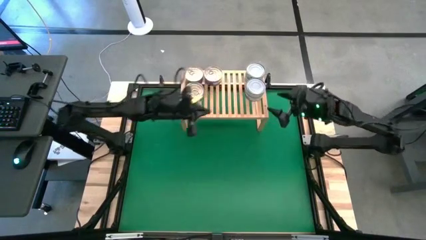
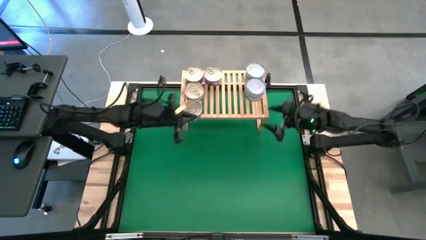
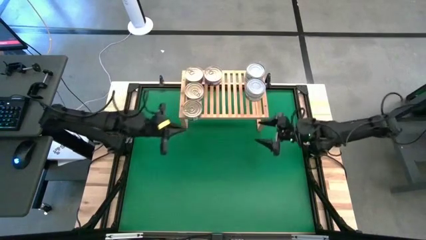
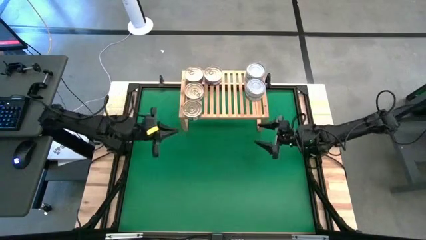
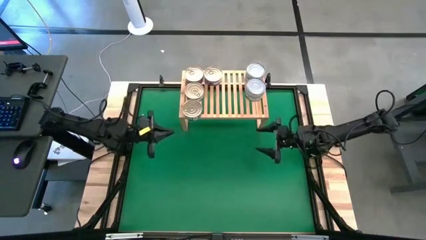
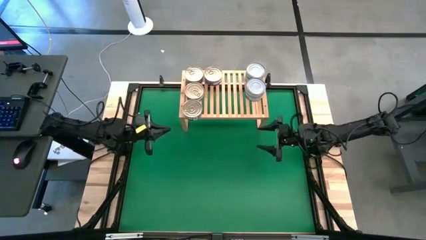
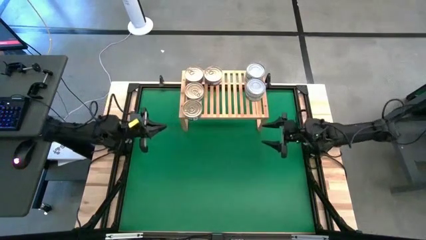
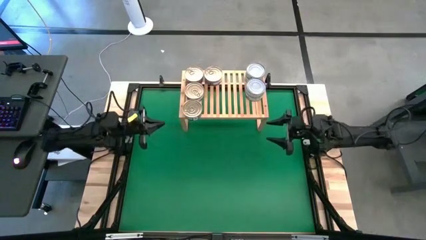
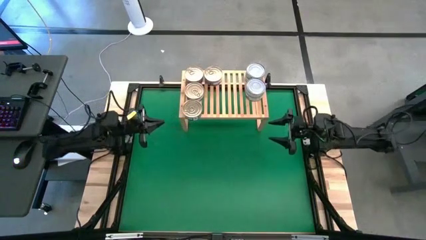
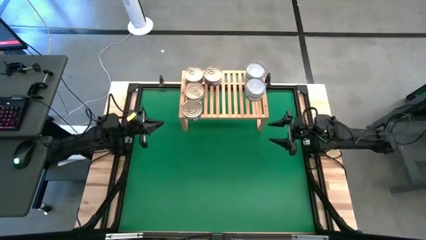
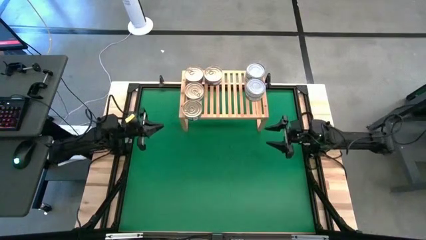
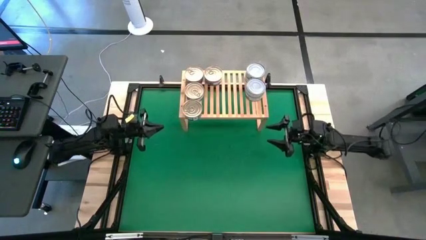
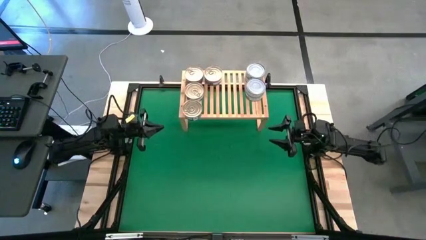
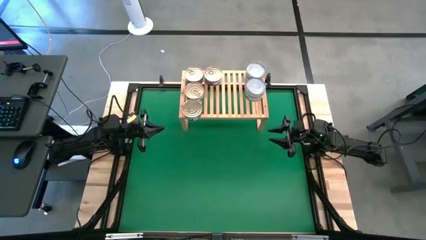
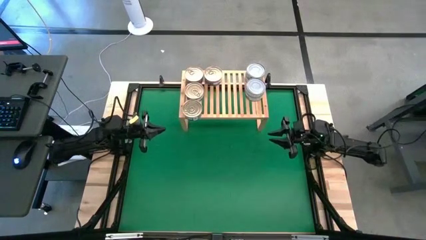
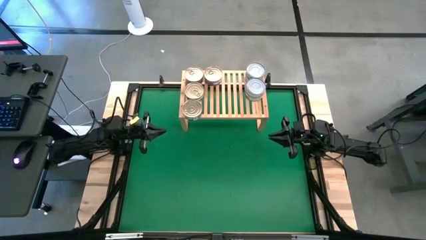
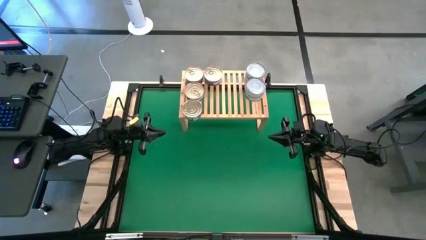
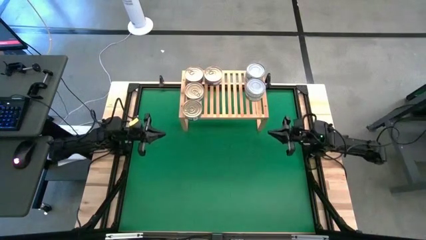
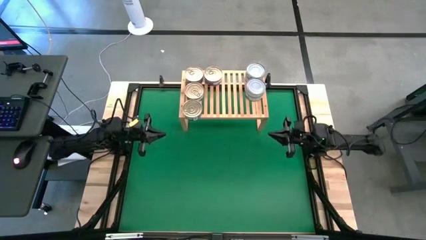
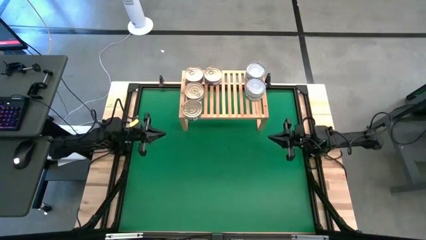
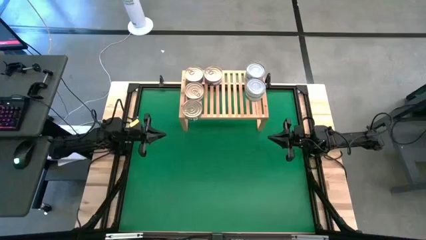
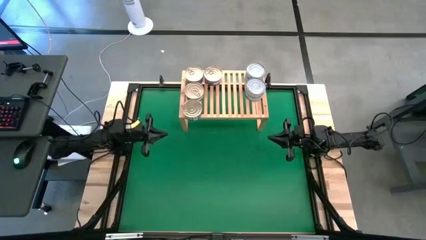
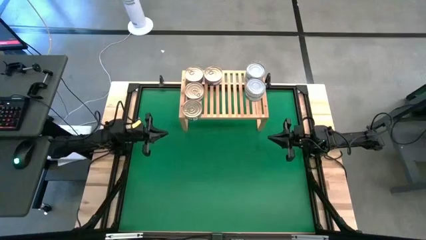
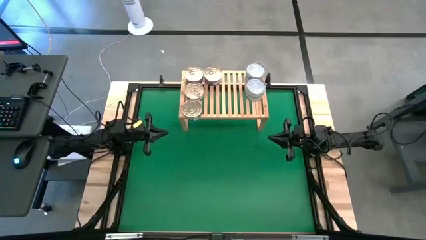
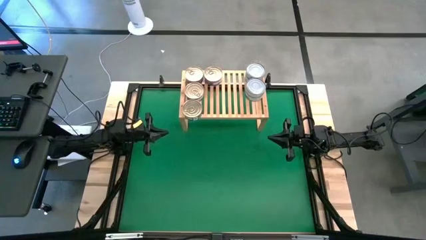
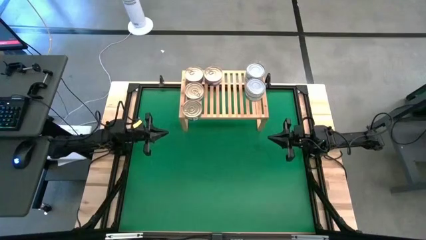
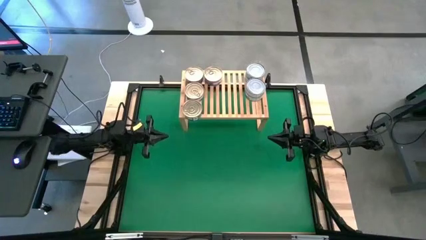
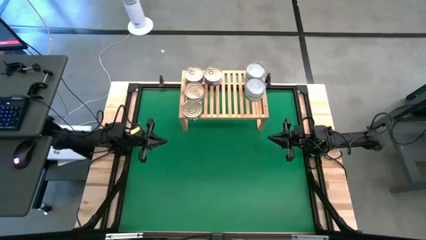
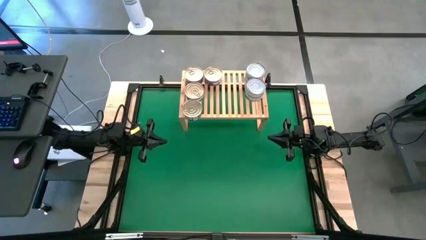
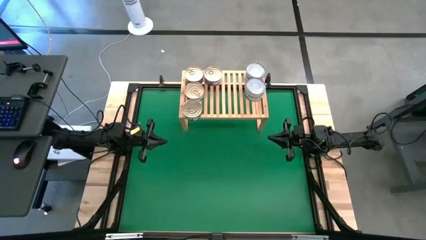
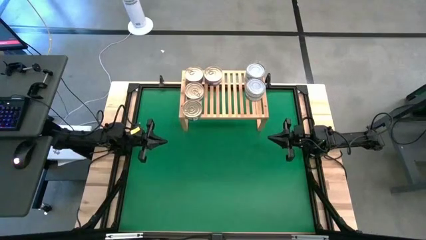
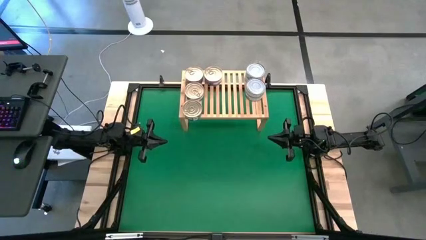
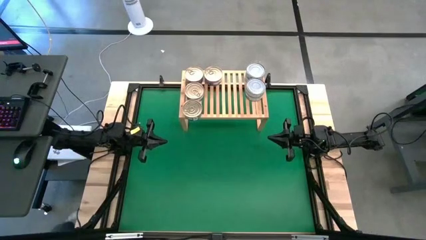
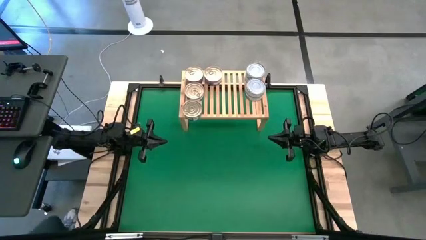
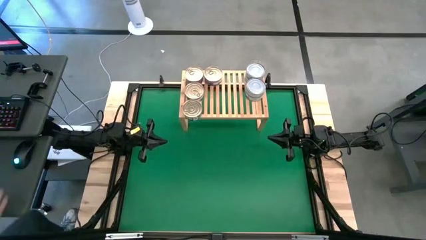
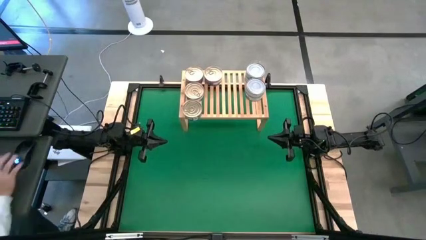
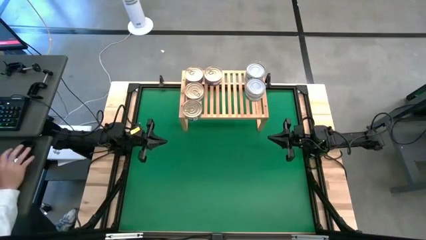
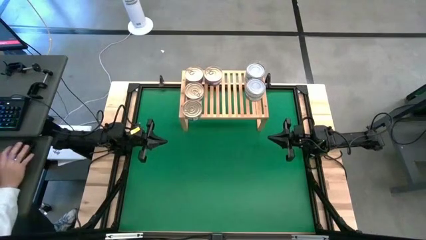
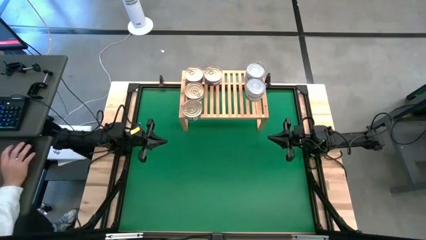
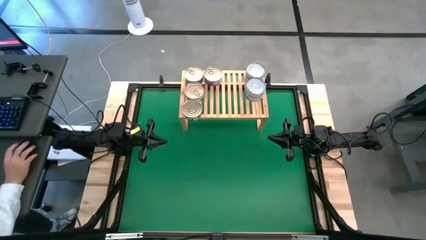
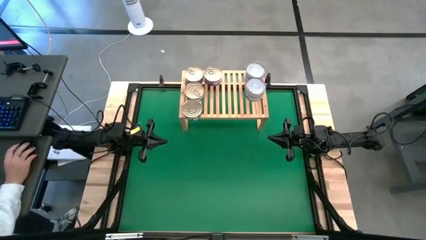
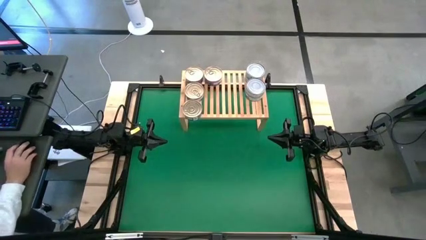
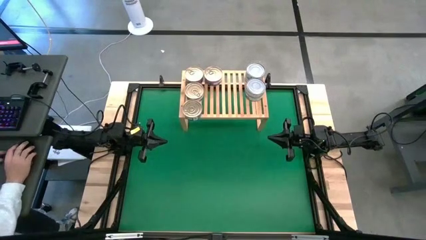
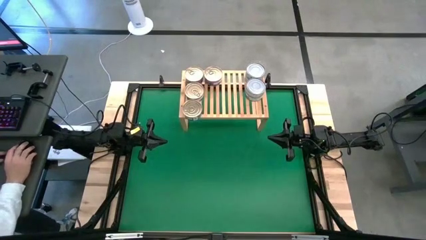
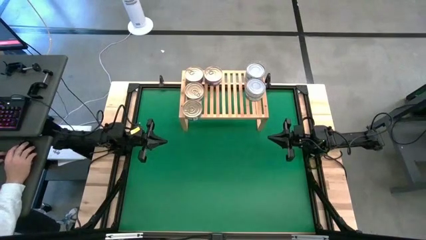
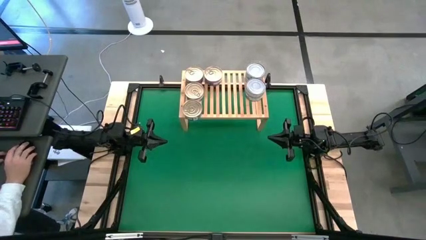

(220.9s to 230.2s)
Task: Stack canned seafood by type on shelf
Return to Home Position

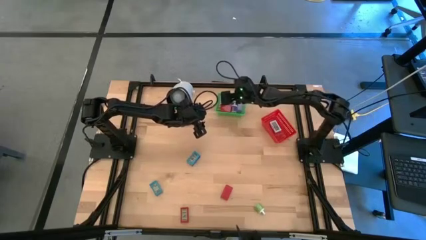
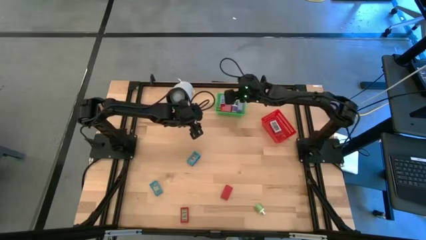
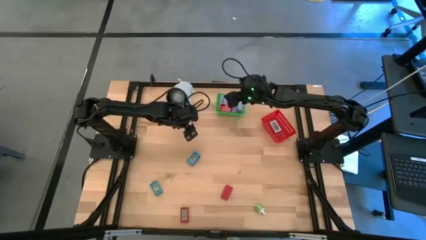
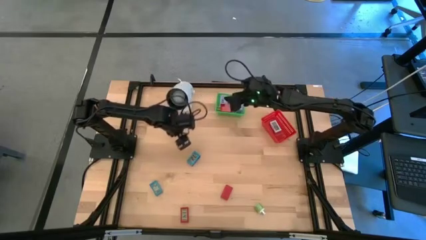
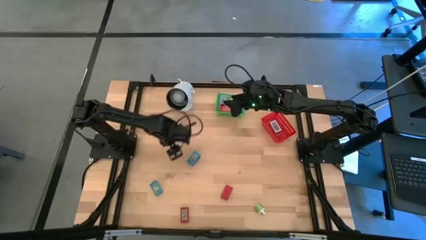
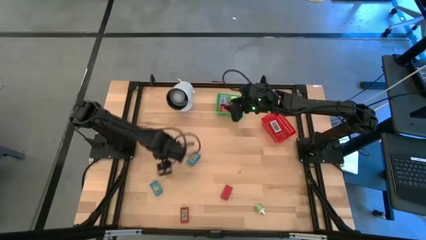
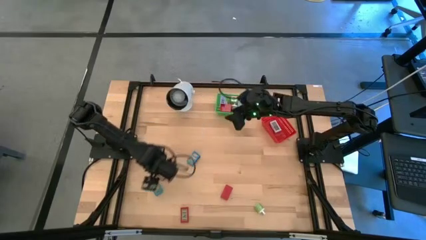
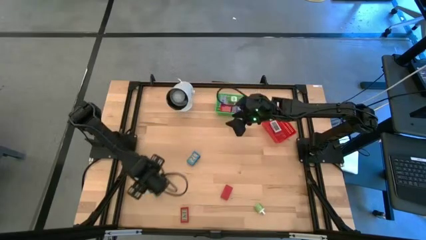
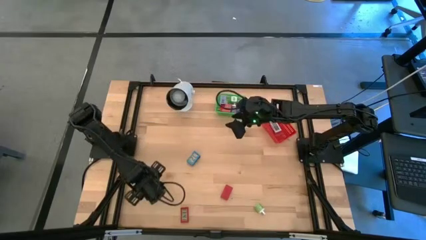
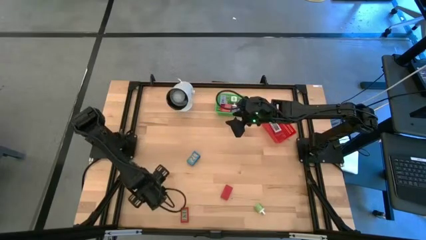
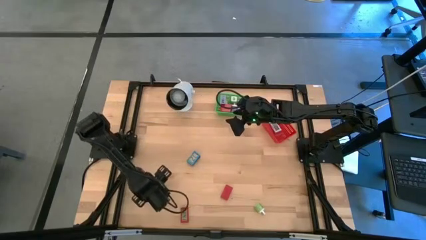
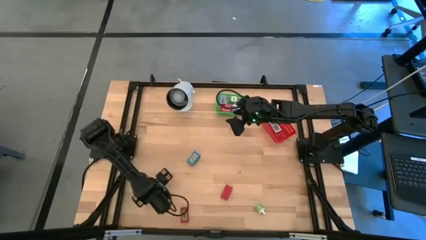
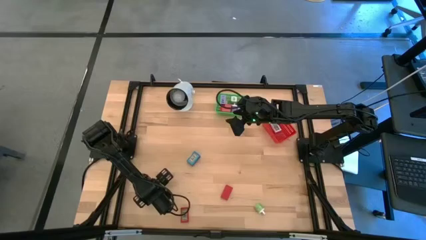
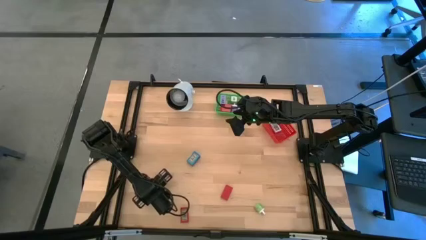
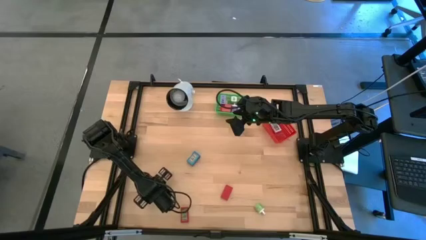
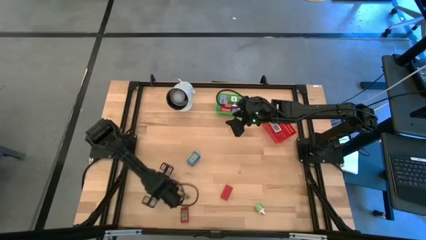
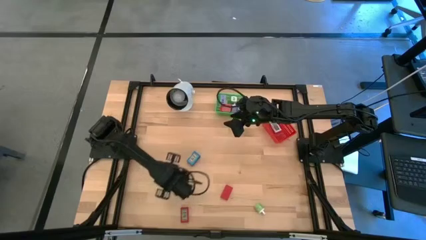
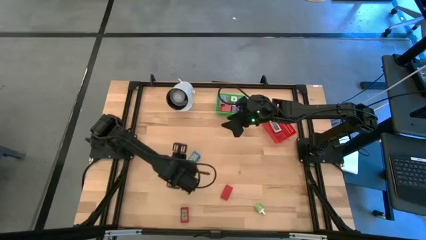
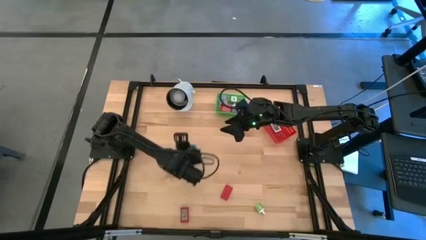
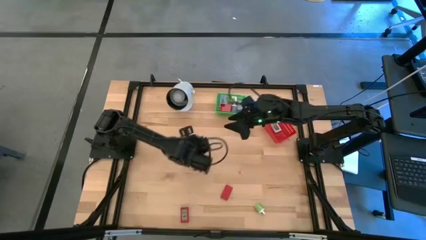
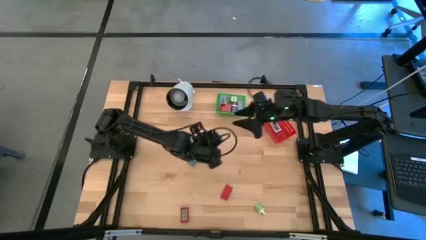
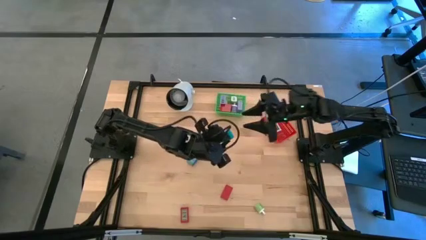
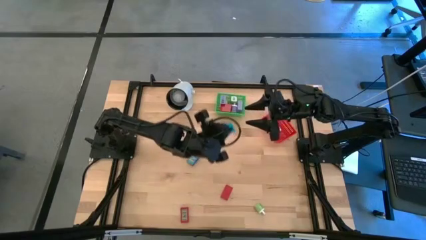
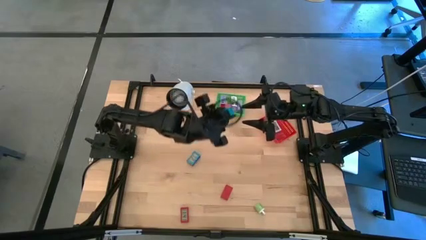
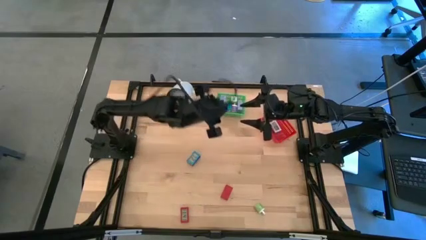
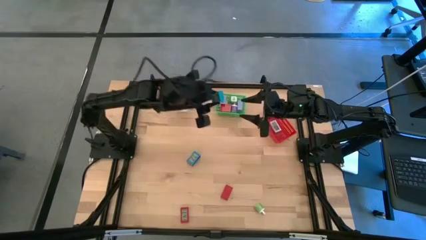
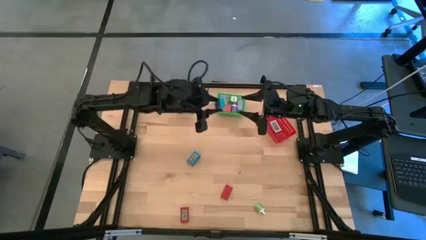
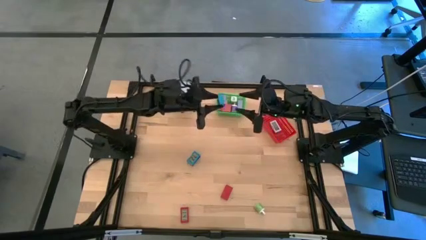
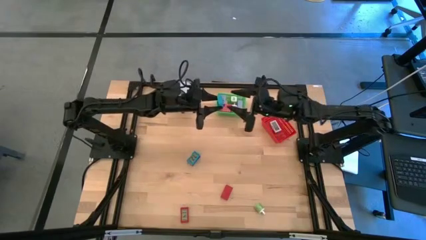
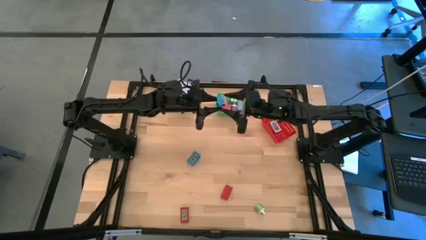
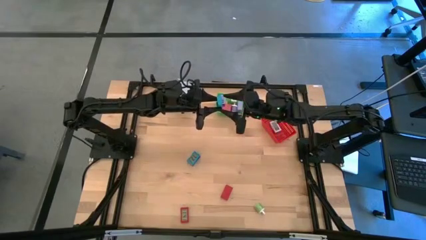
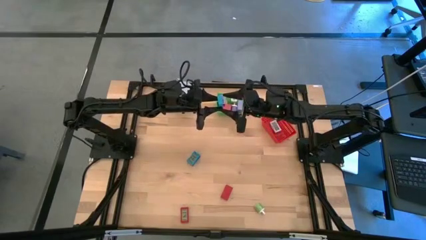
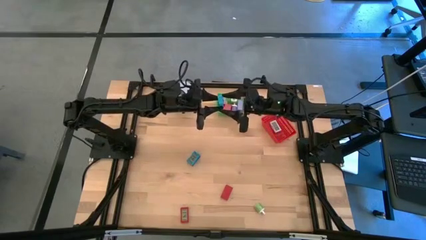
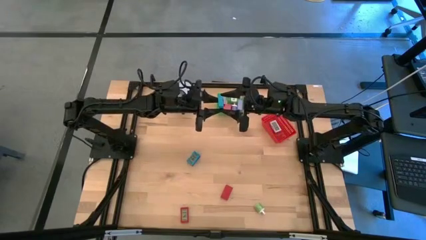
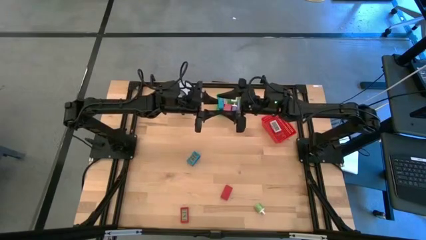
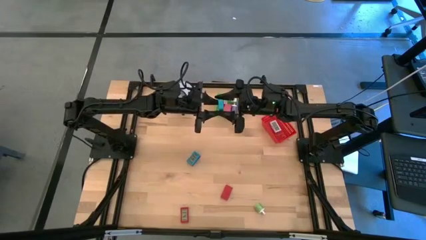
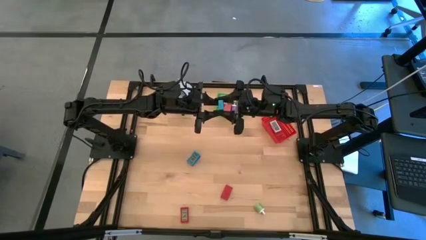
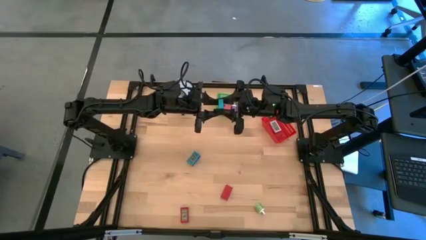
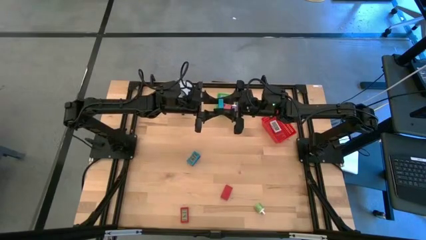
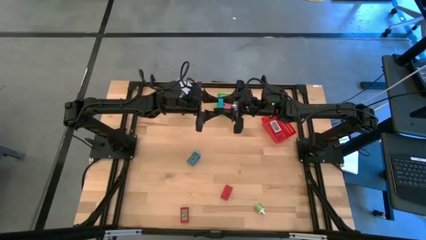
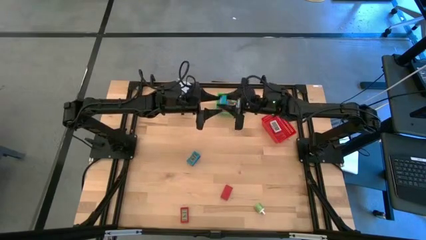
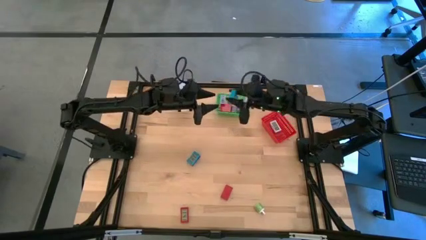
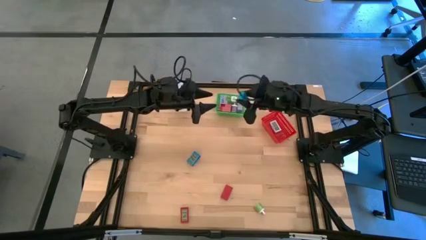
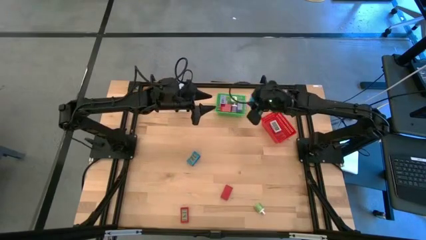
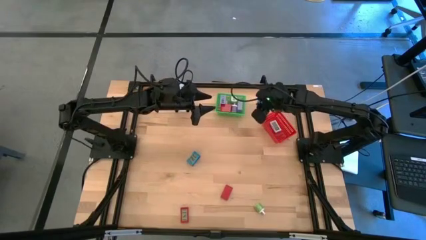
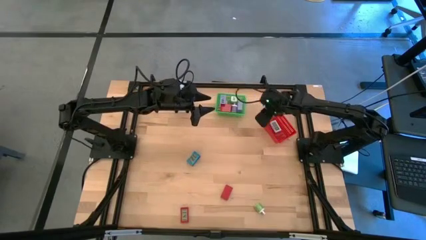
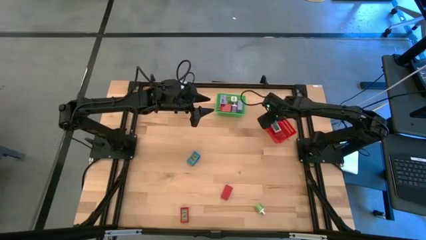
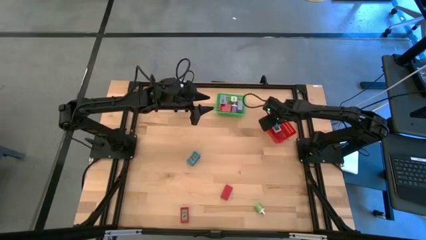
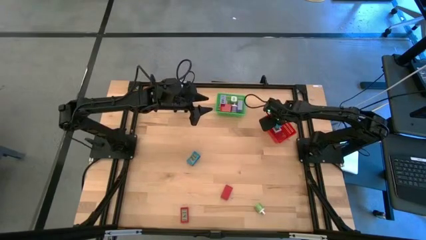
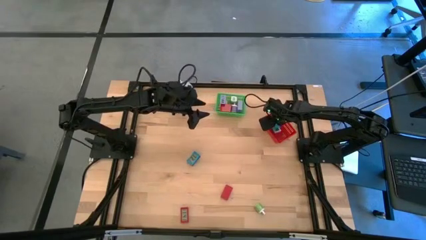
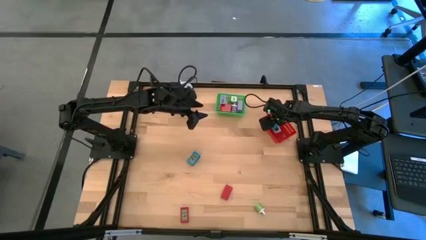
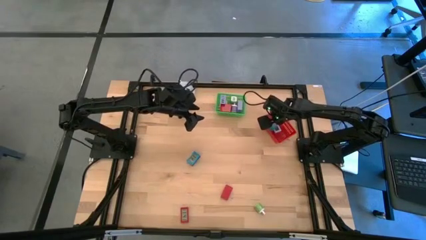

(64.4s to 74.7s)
Task: Pick & Place Office items
Put the bottom blue digital timer into the red bin
